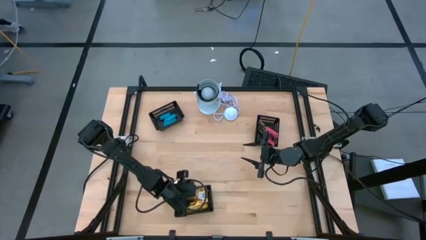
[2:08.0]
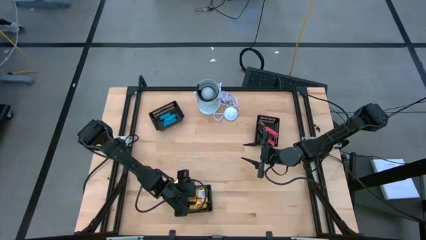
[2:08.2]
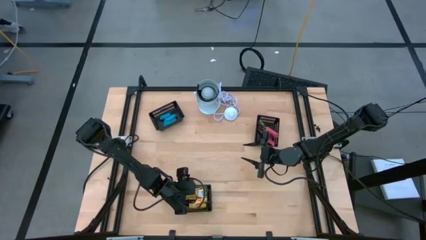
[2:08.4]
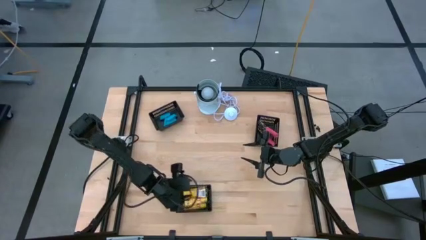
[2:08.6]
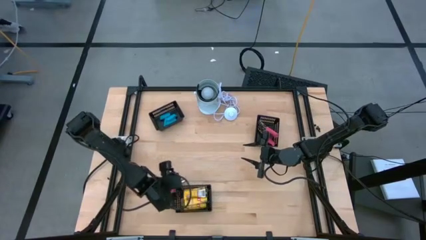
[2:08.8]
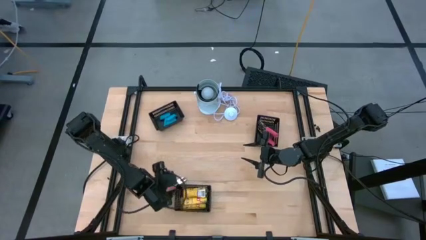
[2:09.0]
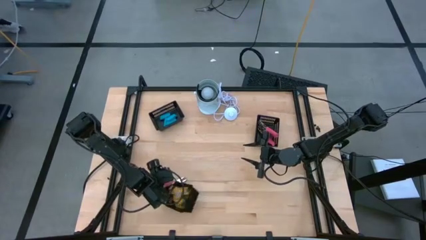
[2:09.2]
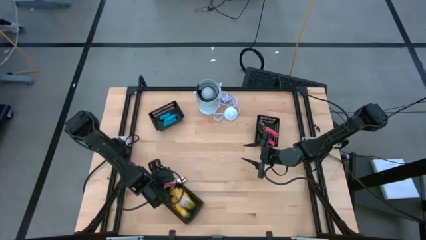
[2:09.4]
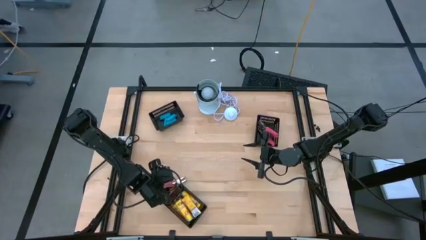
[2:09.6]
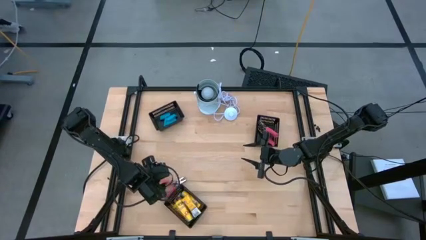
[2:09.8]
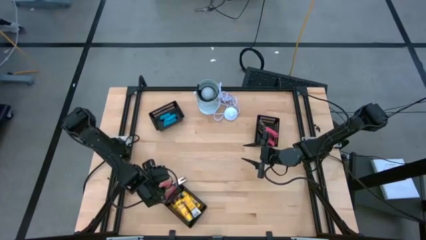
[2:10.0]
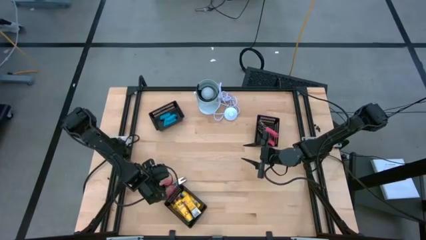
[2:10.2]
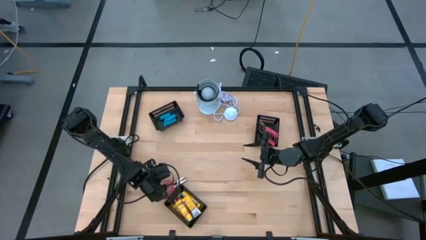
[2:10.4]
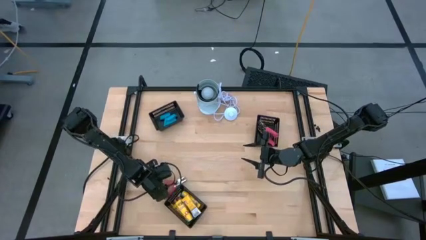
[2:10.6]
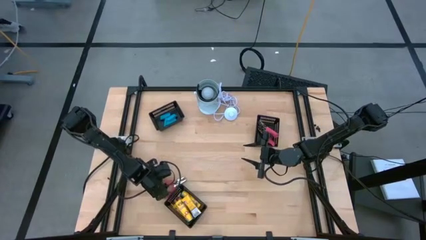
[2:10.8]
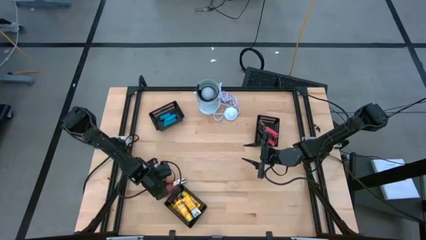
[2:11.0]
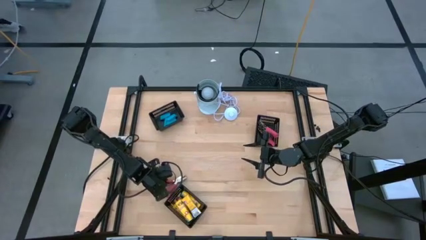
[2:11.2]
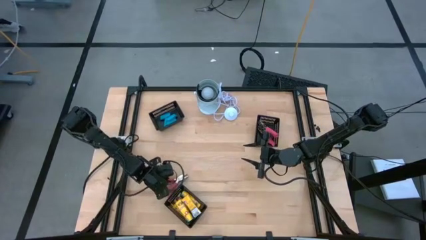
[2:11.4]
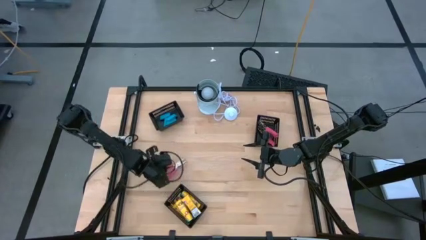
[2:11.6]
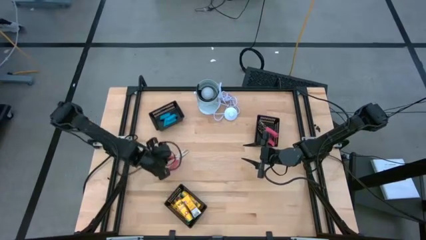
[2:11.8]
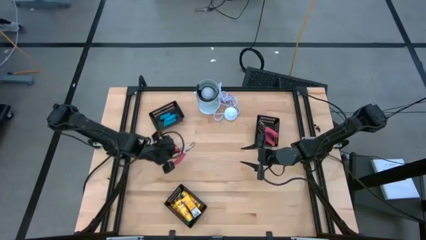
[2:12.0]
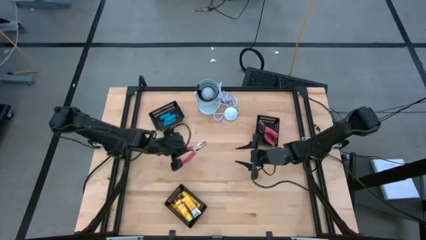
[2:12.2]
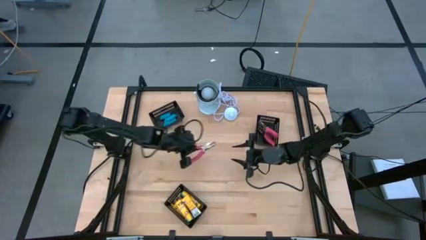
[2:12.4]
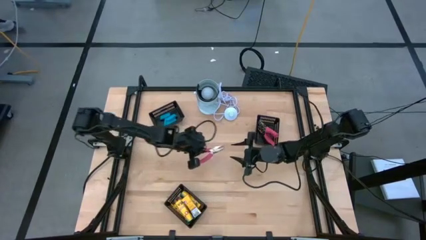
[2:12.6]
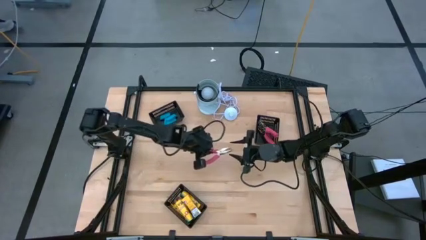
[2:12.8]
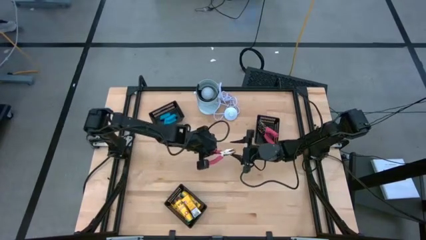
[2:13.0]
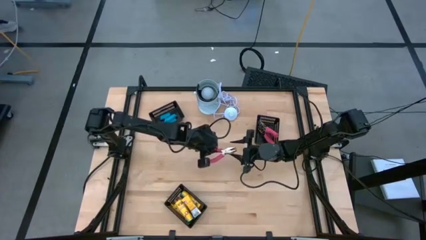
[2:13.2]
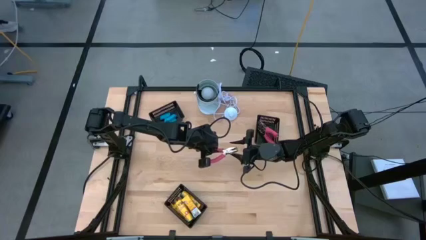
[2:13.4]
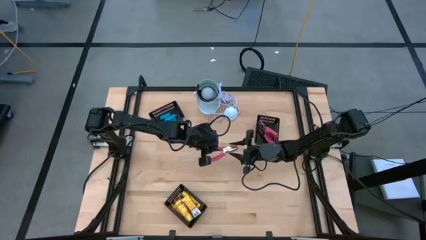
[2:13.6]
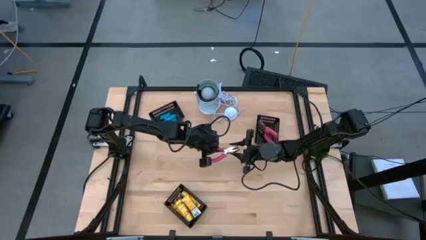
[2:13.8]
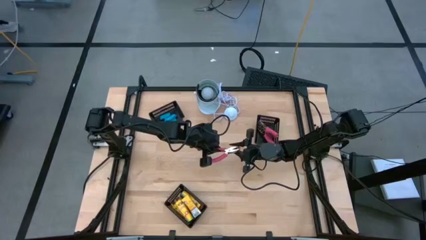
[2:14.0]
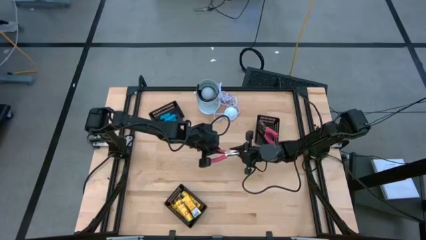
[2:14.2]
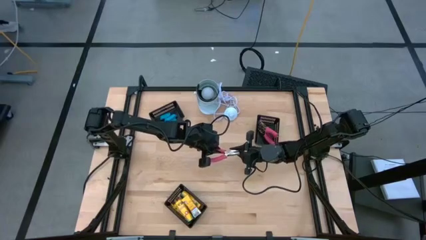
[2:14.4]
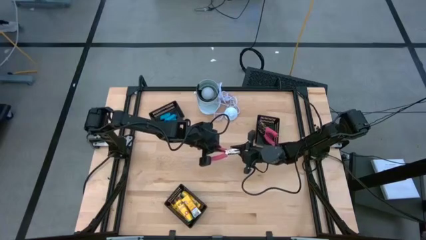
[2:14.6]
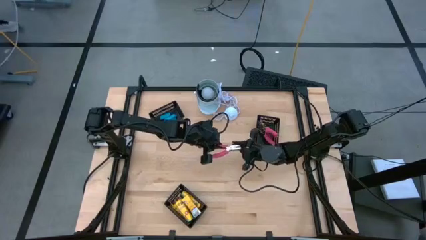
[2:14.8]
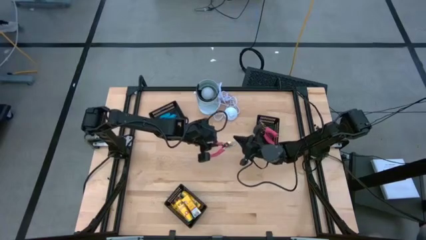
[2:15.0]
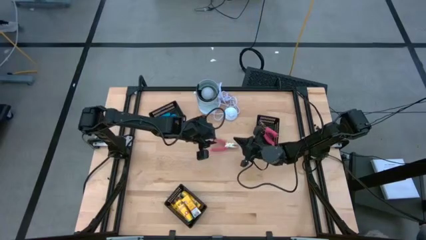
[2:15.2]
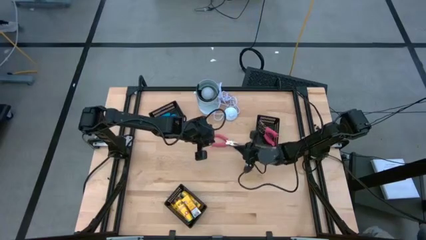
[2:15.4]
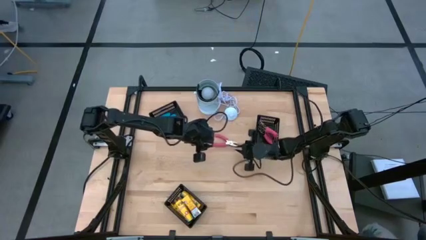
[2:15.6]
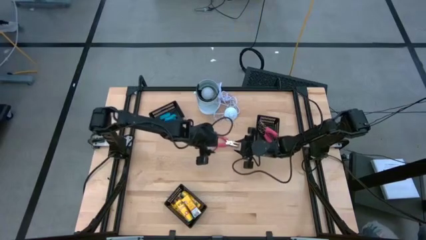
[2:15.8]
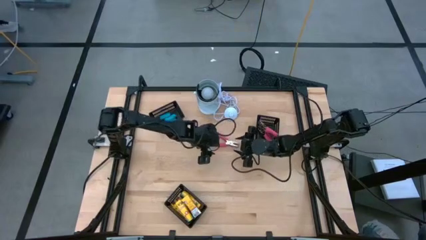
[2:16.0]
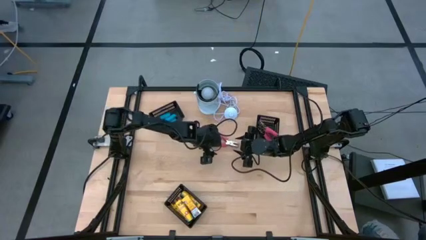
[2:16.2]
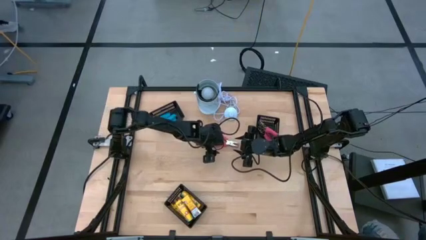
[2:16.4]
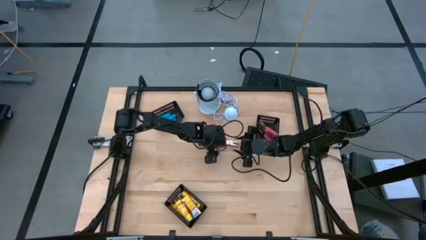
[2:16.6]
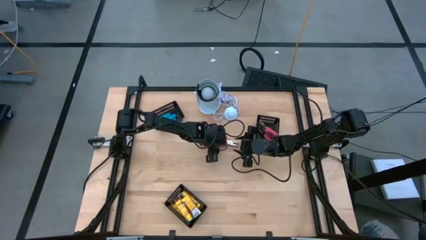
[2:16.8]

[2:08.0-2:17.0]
Task: Pick & Place School Supplies
Put the pink puncher into the right black bin

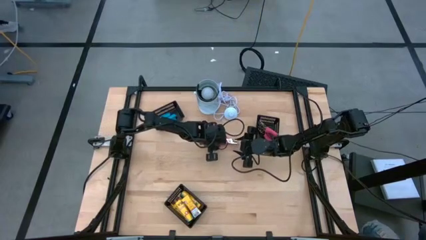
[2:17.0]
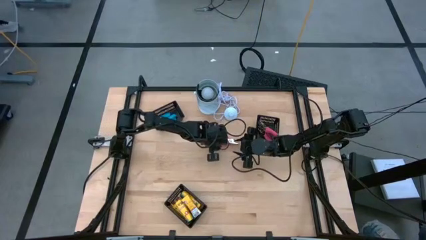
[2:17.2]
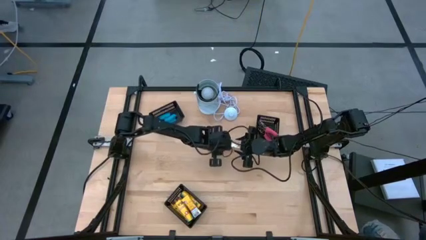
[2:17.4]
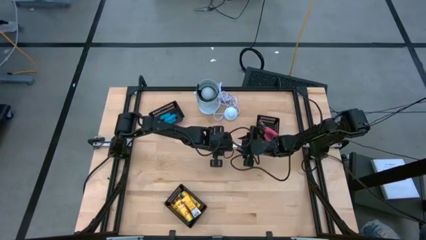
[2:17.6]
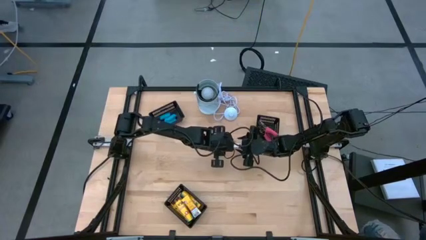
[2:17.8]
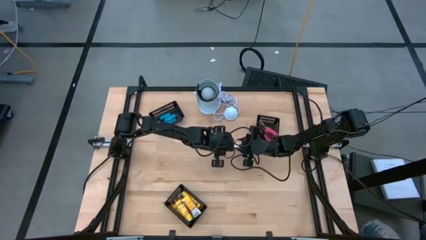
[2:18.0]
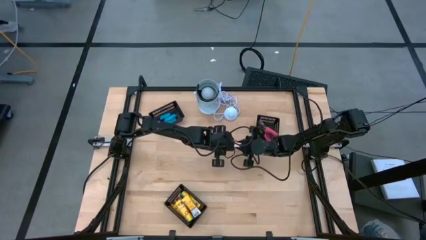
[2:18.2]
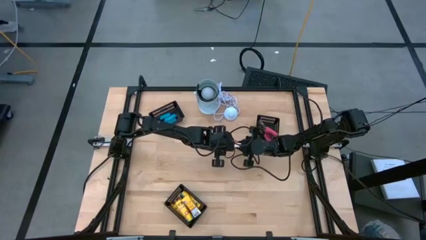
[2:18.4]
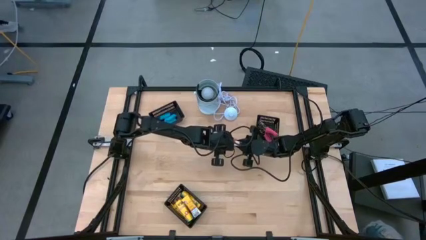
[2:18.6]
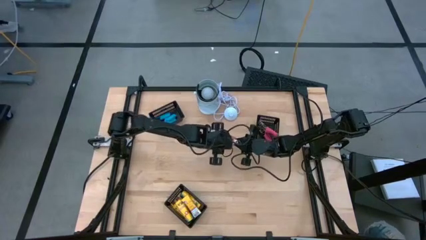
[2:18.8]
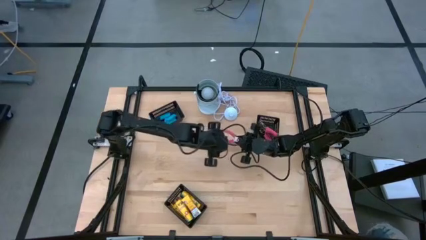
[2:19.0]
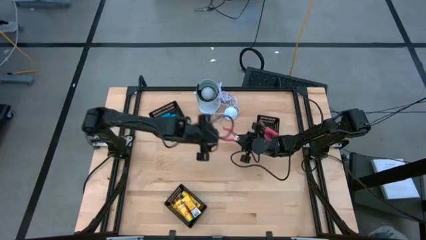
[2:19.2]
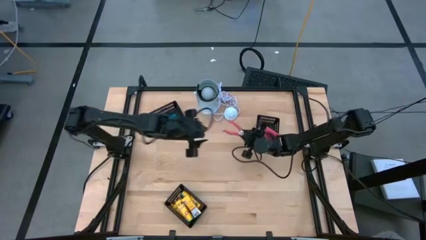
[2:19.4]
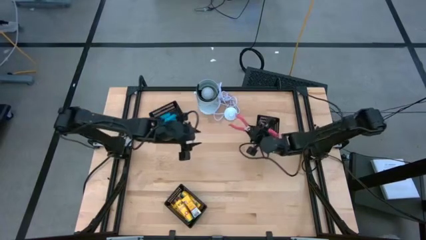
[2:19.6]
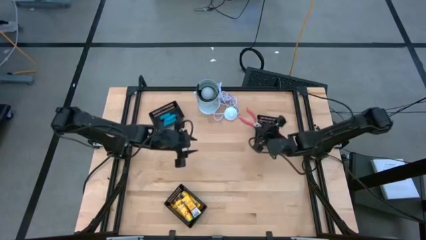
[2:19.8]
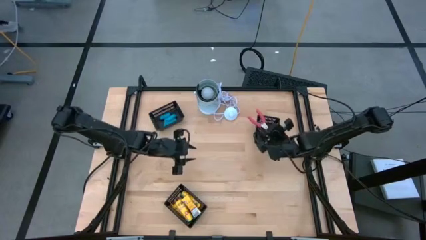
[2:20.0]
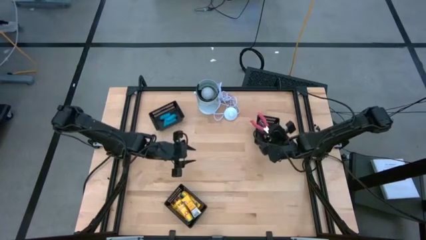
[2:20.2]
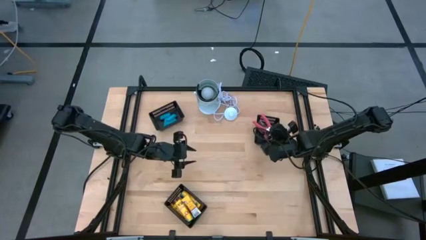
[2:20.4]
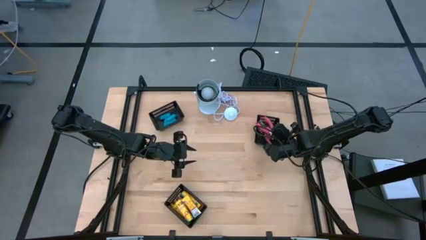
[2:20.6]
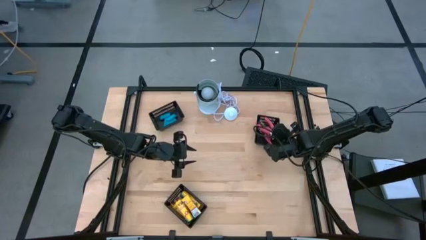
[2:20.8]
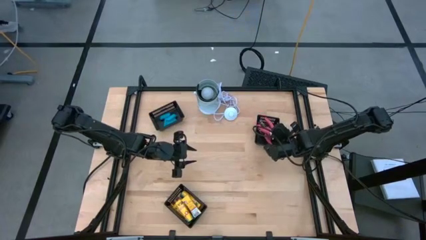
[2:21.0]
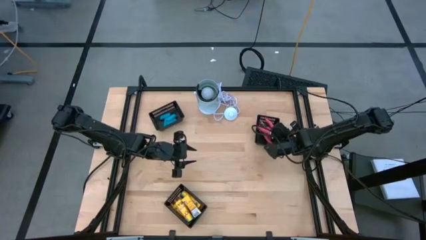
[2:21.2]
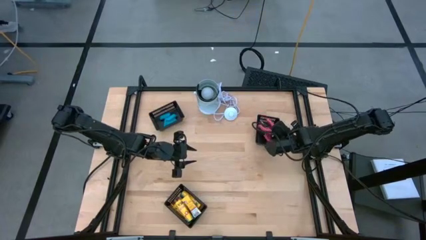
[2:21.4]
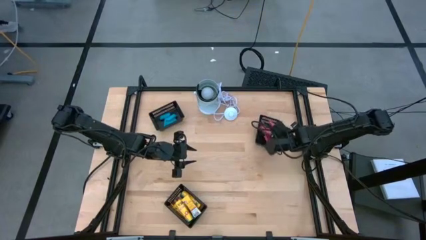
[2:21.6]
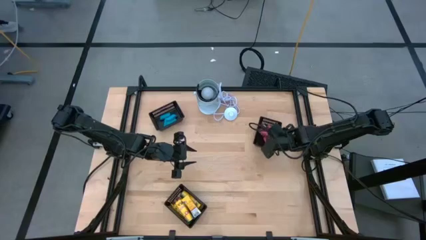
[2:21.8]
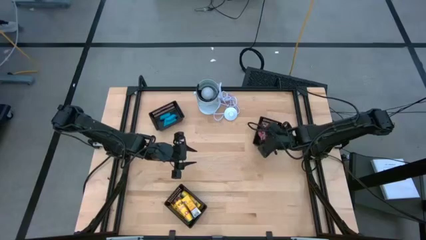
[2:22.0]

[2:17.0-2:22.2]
Put the pink puncher into the right black bin

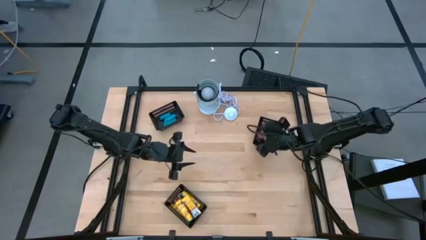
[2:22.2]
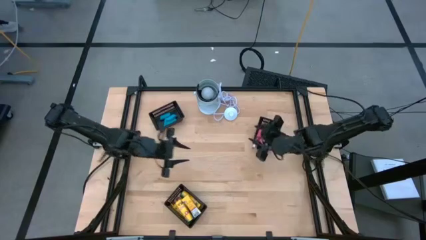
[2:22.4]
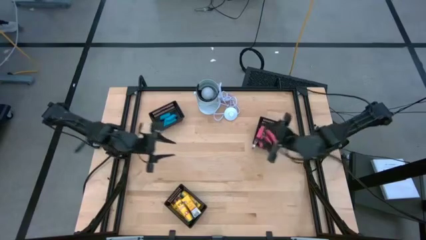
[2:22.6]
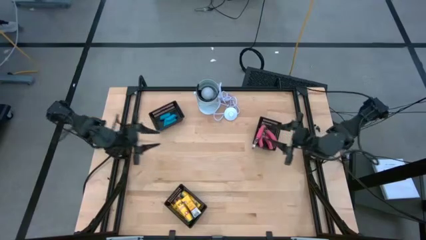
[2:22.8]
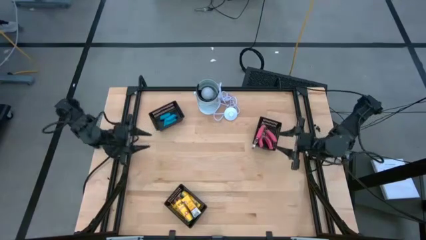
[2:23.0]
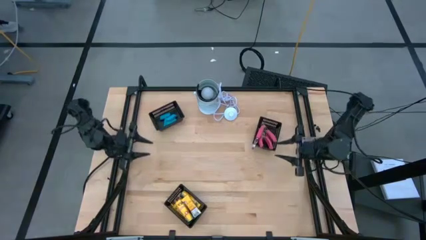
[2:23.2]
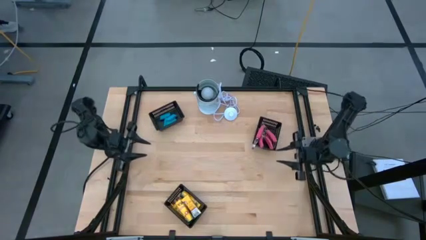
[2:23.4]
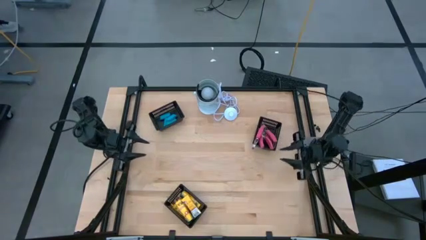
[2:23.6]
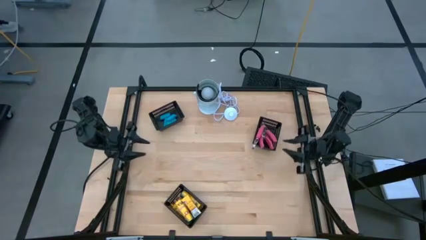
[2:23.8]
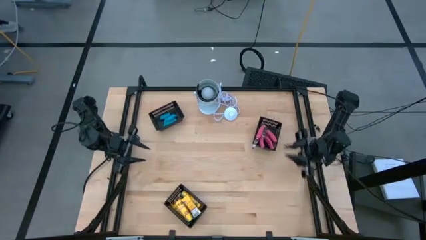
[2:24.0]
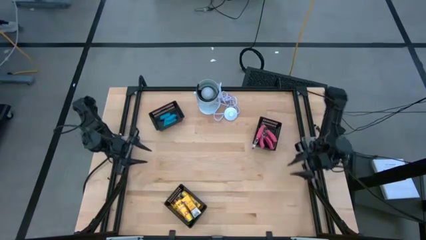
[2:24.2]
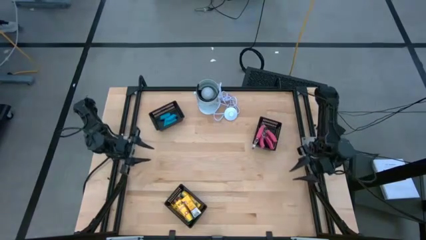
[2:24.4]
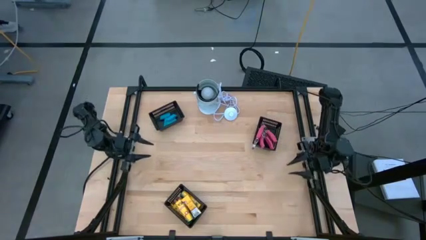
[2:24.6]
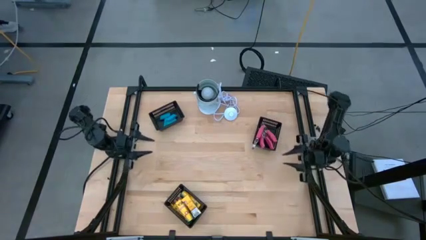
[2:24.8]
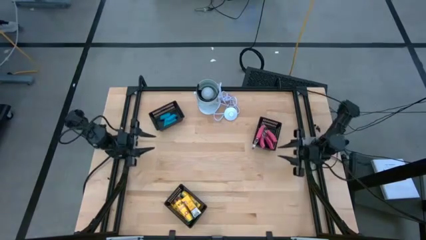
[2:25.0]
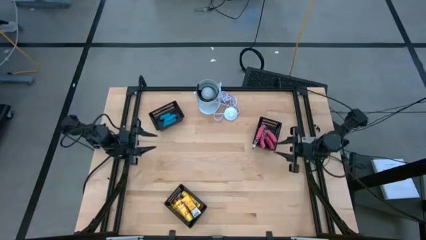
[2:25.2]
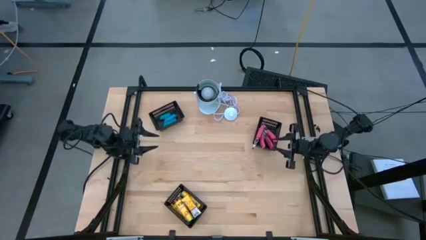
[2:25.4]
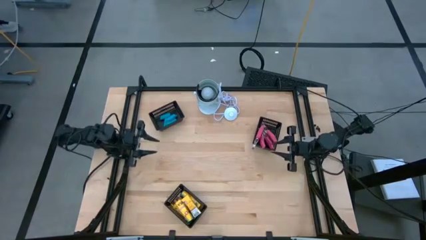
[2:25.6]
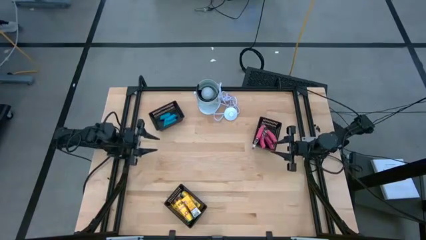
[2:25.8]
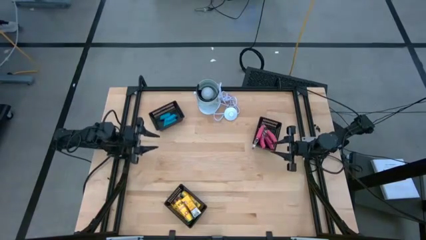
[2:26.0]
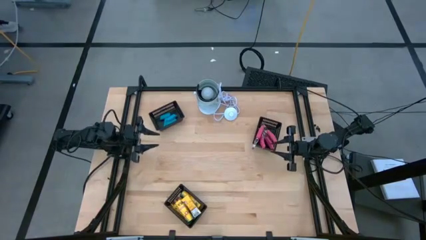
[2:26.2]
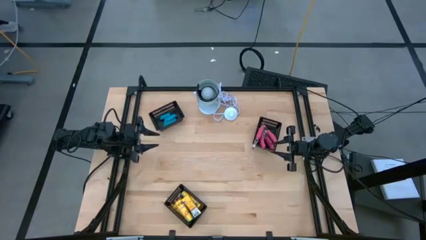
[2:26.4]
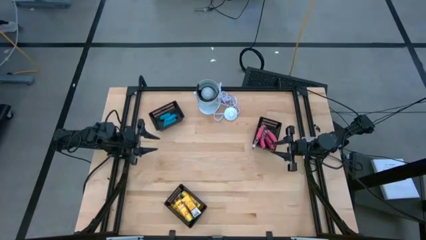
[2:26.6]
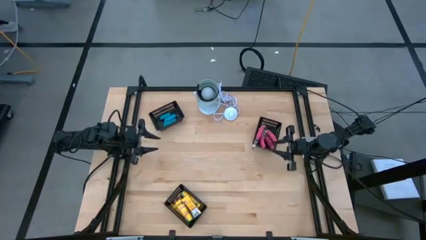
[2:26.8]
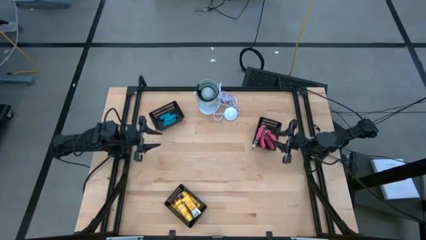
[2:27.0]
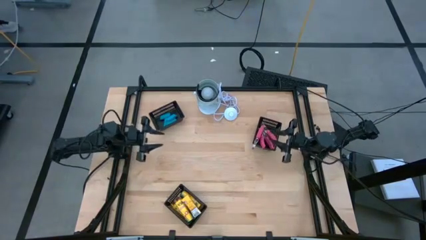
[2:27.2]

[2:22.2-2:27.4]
Return to Home Position
